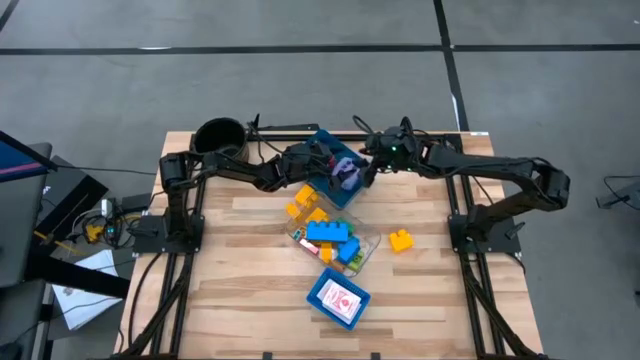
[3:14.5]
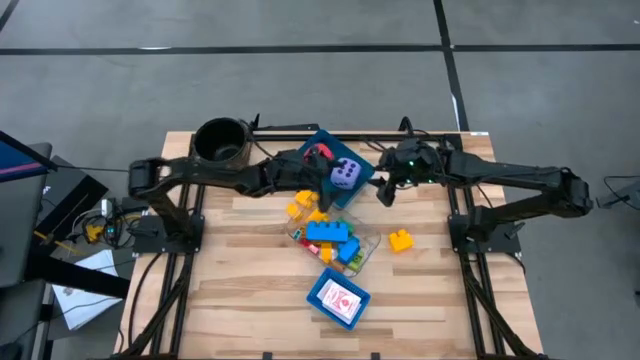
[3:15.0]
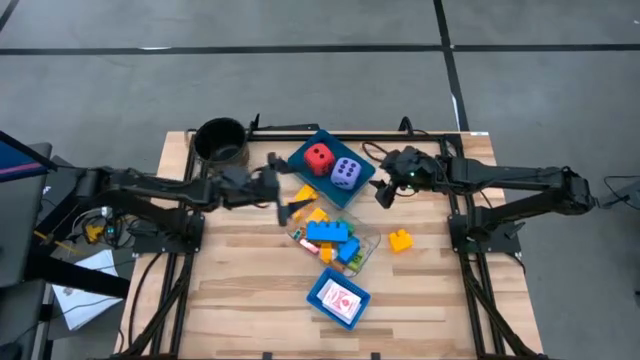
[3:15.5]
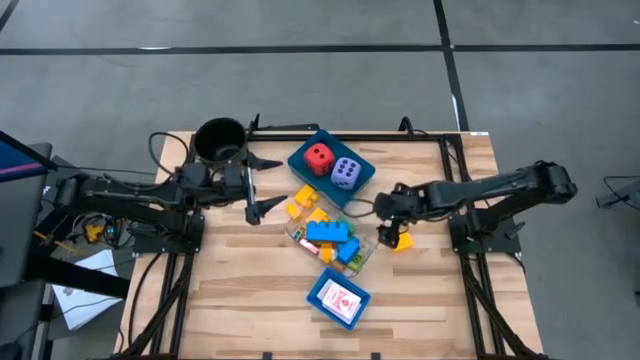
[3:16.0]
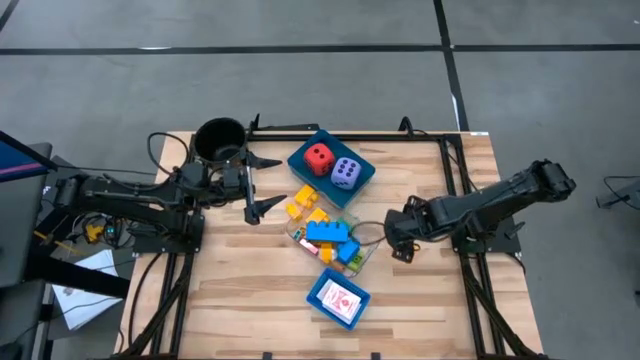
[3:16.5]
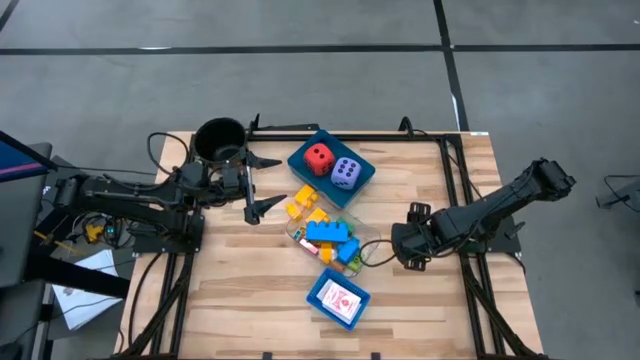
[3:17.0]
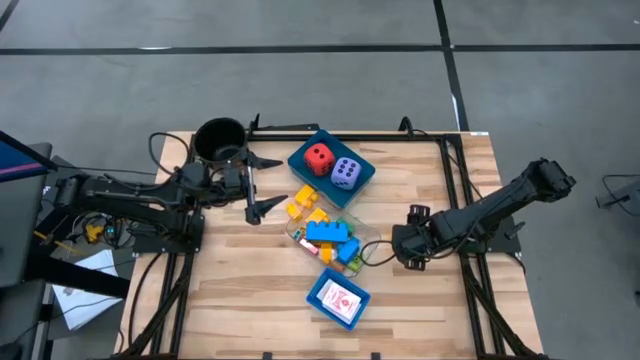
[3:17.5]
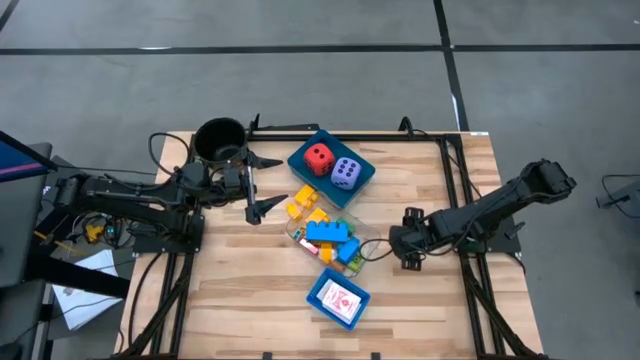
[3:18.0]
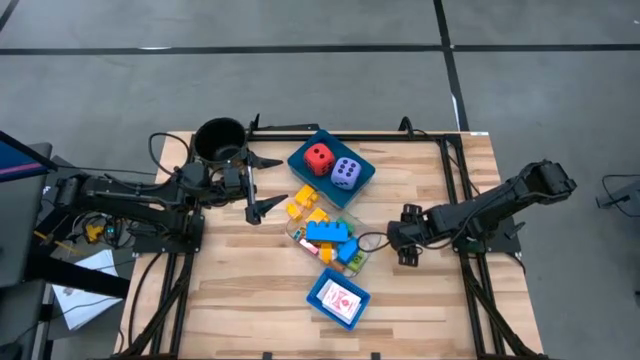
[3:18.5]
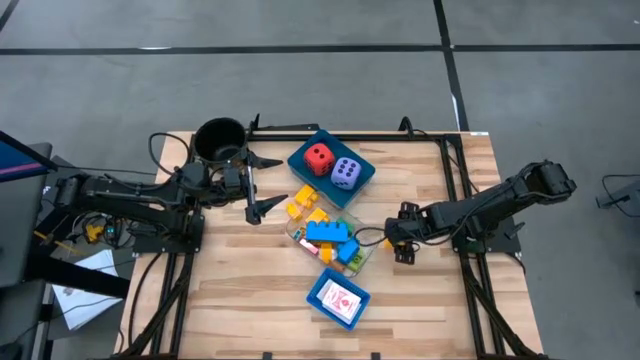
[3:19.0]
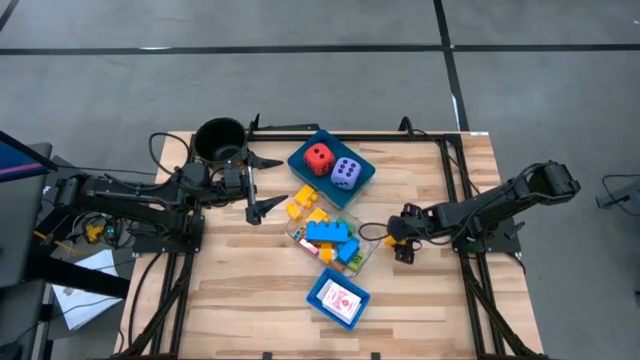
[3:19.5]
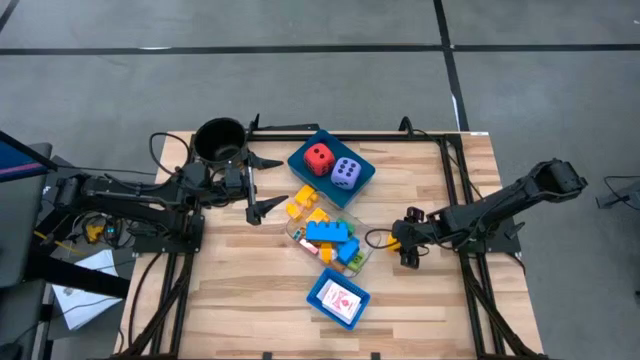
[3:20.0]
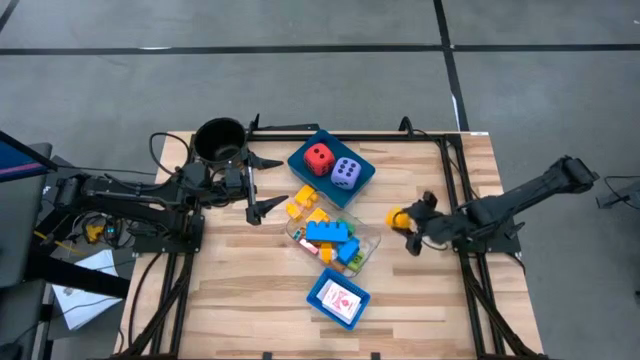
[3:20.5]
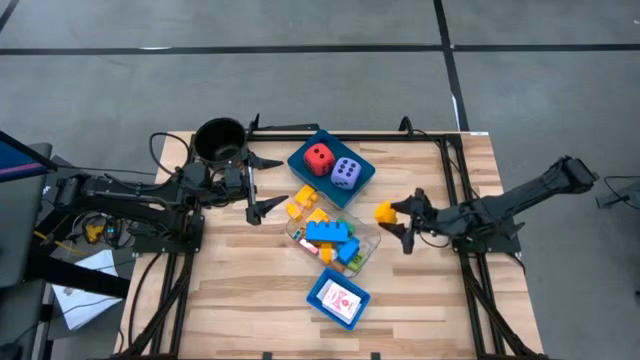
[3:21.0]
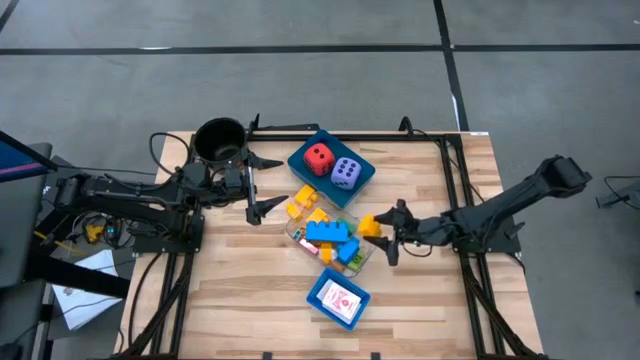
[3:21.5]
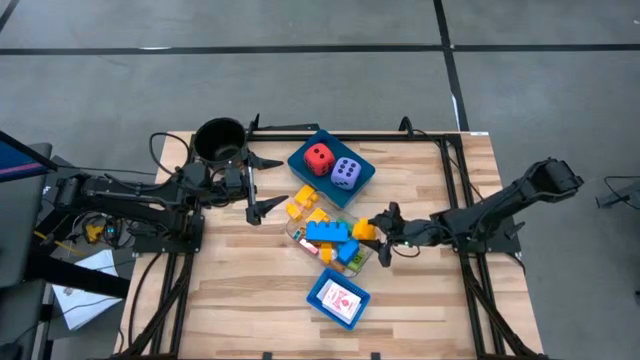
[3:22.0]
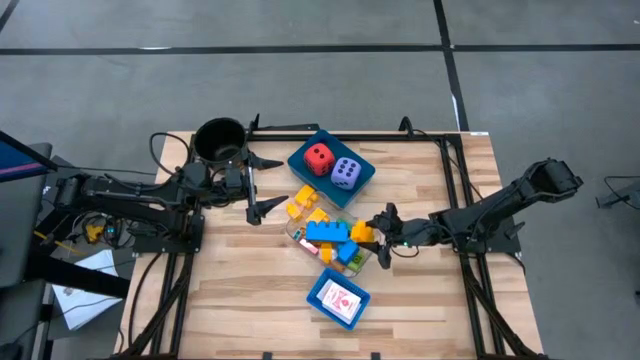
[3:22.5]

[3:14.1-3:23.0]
Task: Pick & Place Toys
Put the yellow game piece block into the transparent bin

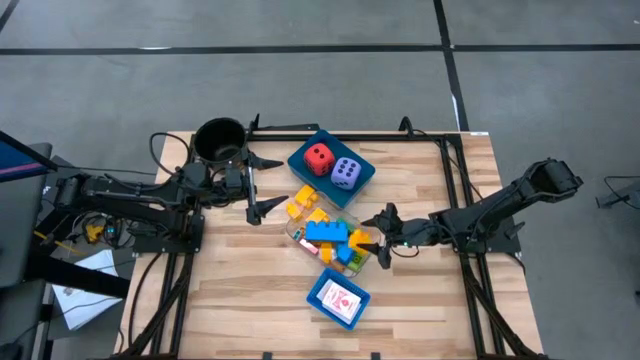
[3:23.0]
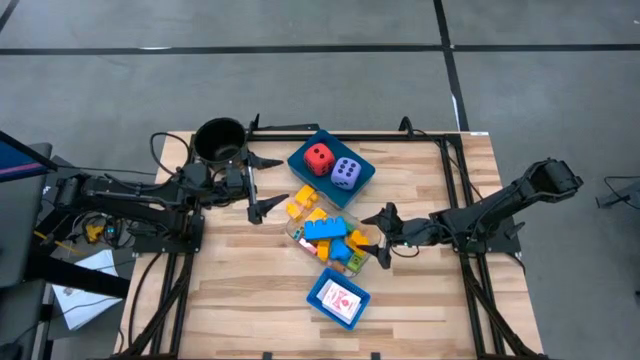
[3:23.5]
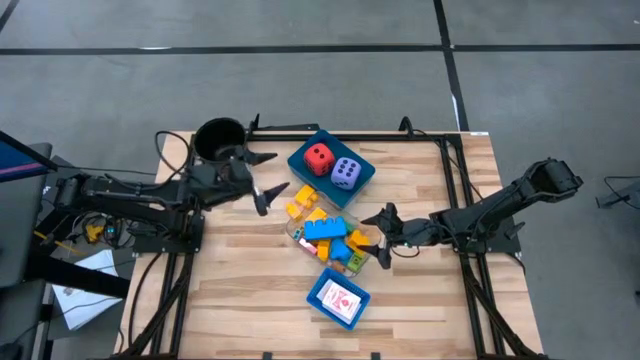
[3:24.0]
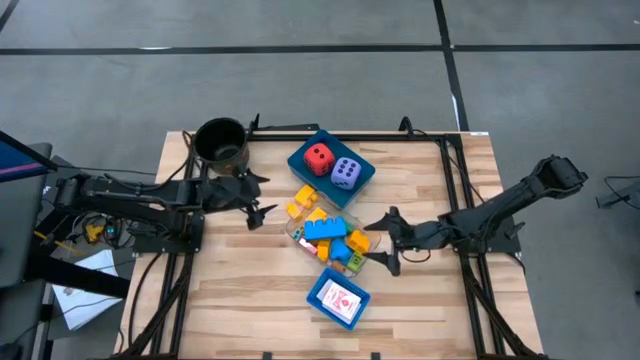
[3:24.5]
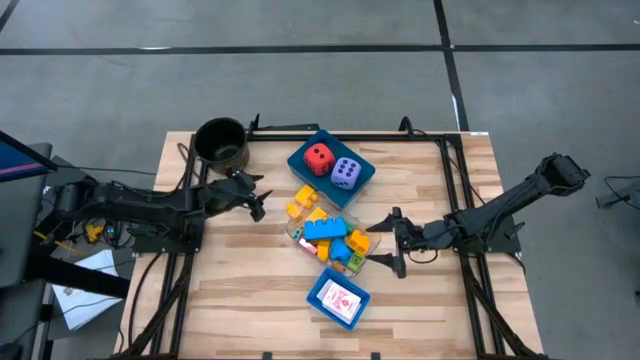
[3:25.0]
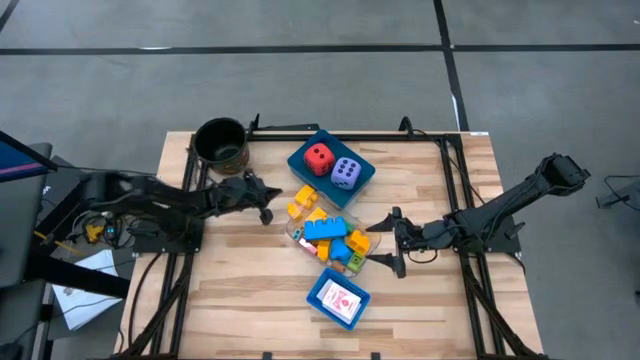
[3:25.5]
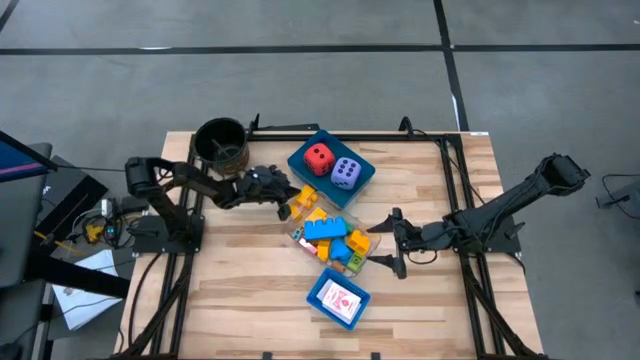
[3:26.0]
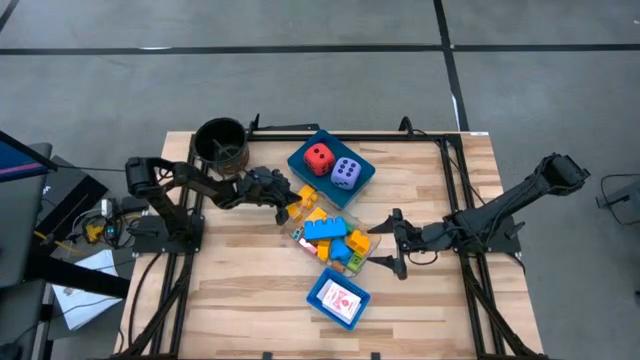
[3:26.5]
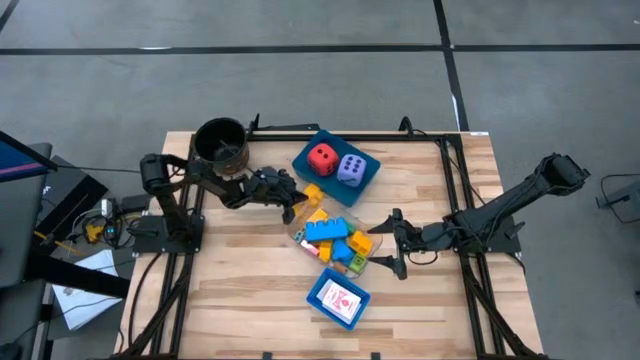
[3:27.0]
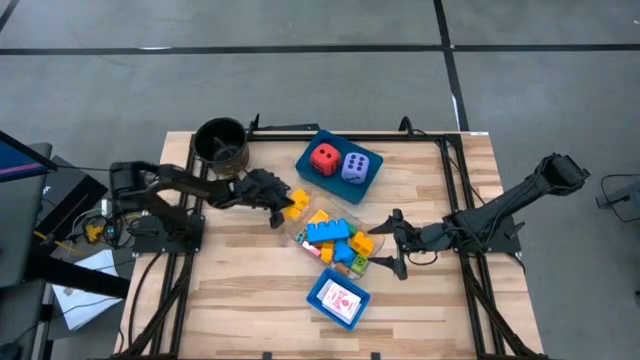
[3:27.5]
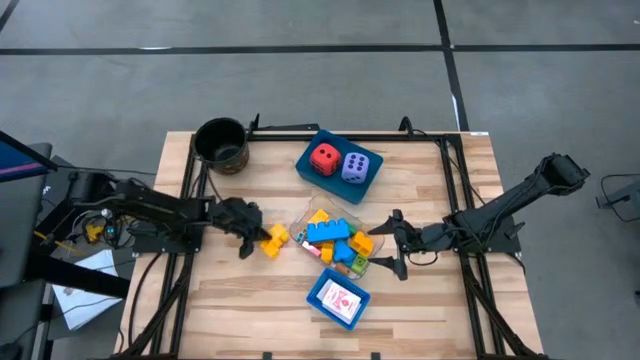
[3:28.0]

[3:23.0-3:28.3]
Move the yellow game piece block to the center of the table

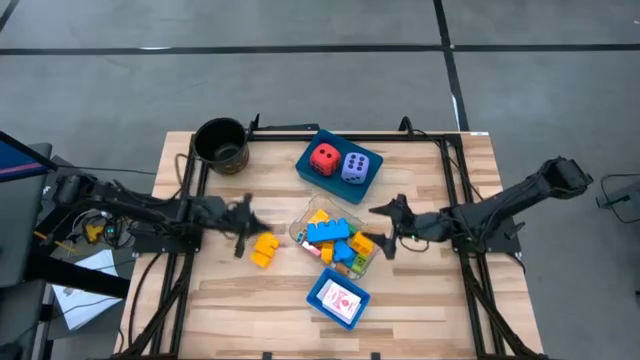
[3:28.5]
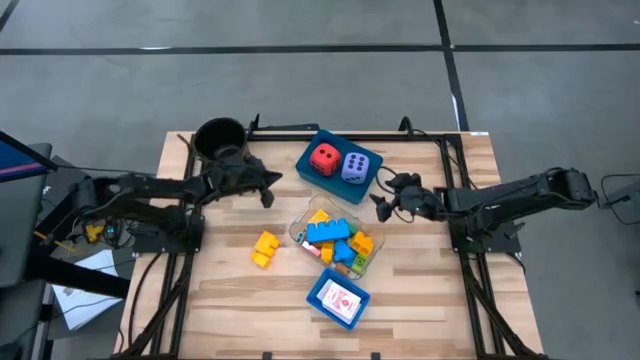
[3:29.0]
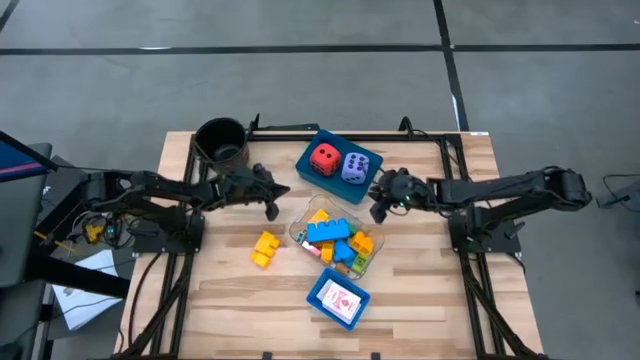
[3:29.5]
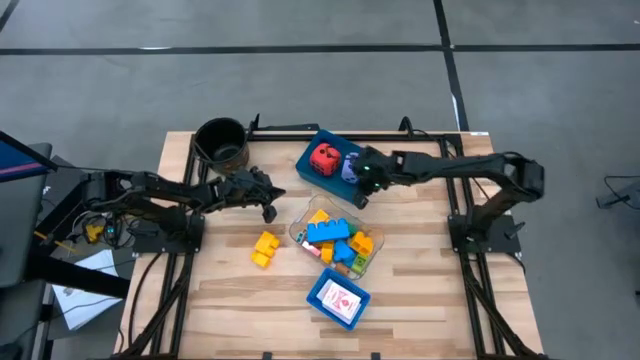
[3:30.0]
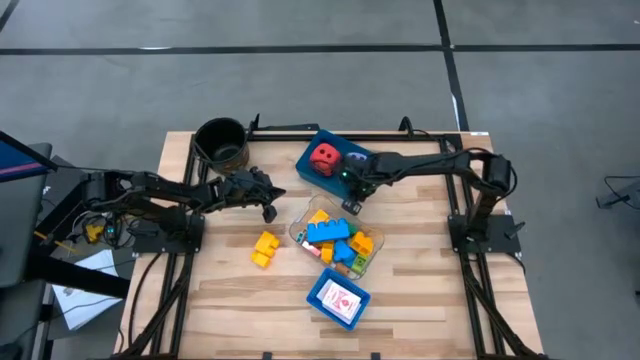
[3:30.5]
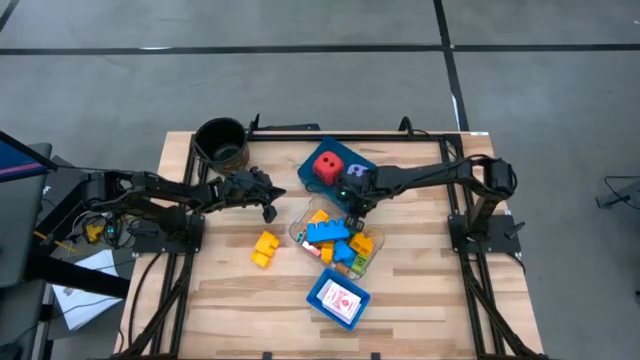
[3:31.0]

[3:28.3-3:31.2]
Adjust the ocean blue bin

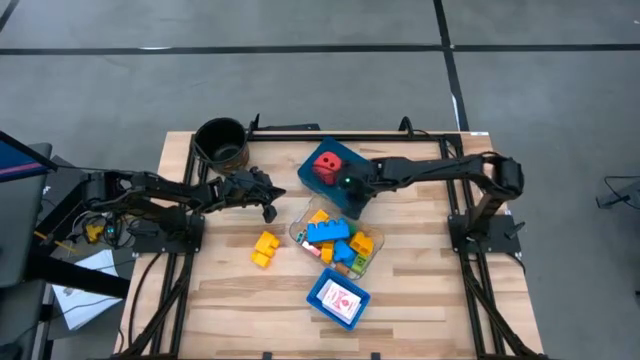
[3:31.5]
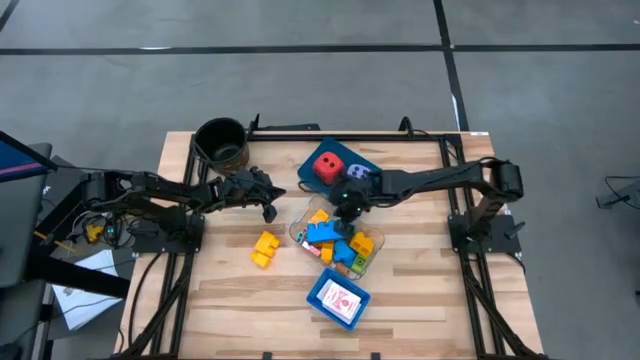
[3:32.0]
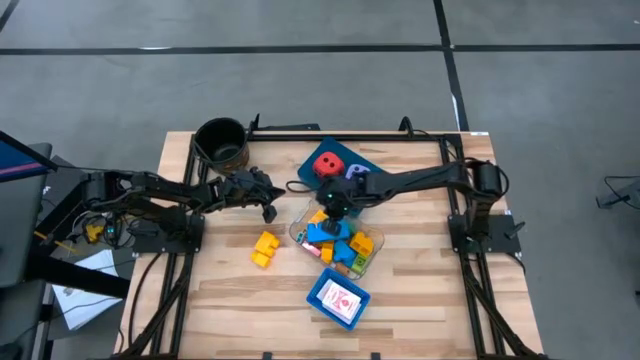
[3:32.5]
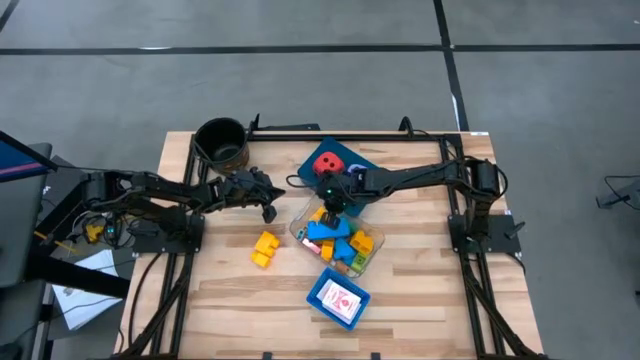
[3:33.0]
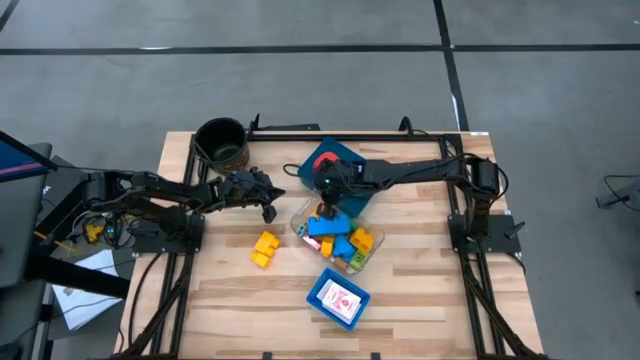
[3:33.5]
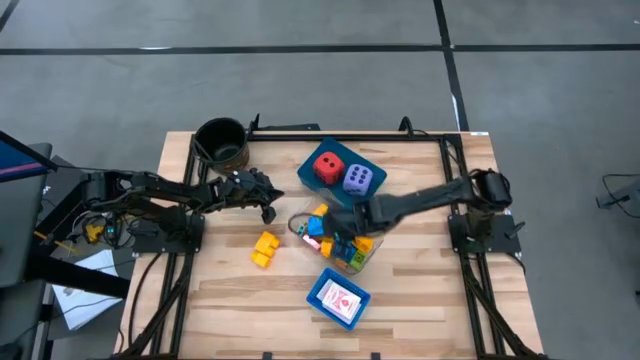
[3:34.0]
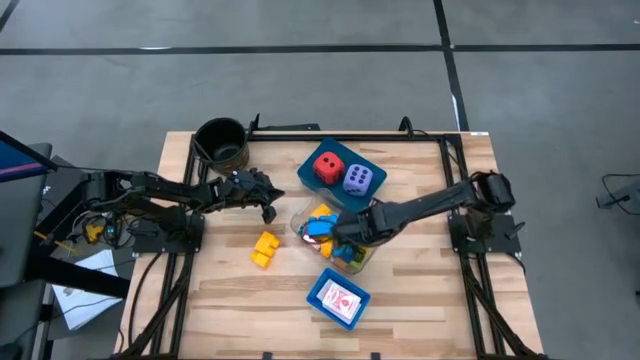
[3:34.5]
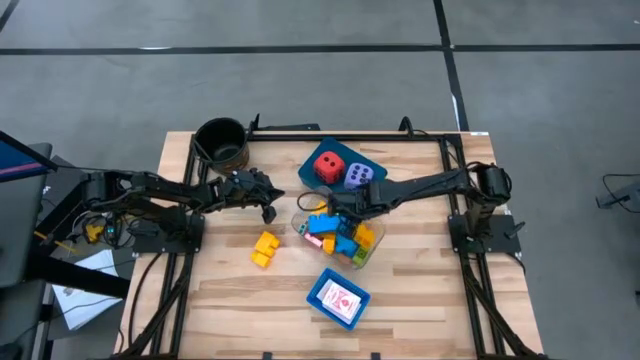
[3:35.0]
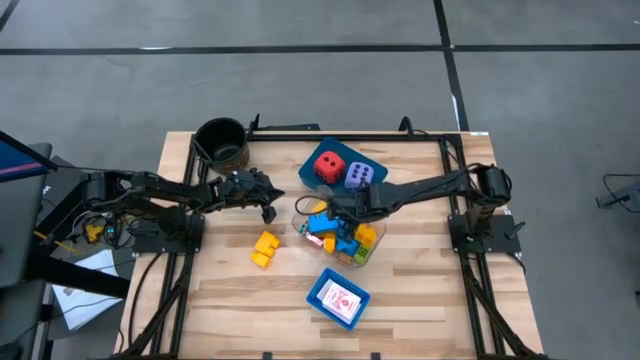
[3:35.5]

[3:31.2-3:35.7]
Adjust the transparent bin
